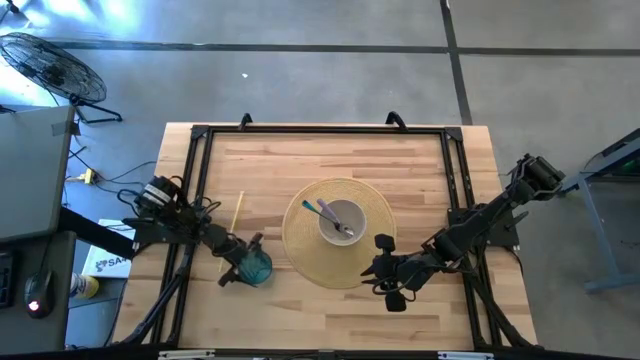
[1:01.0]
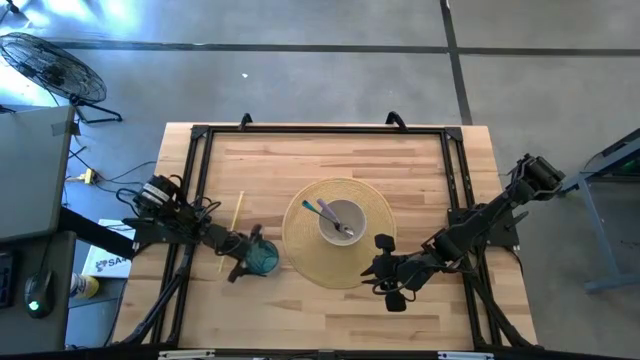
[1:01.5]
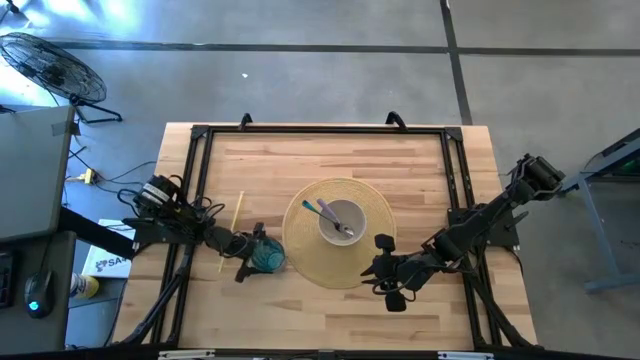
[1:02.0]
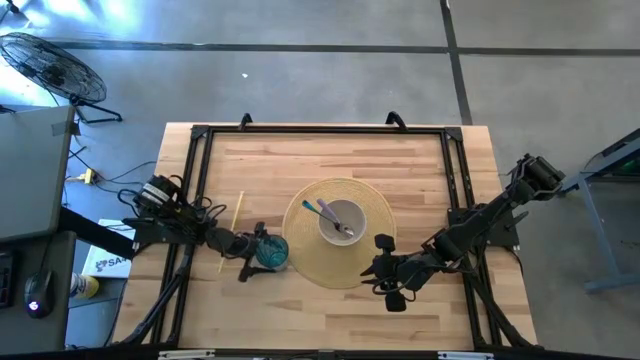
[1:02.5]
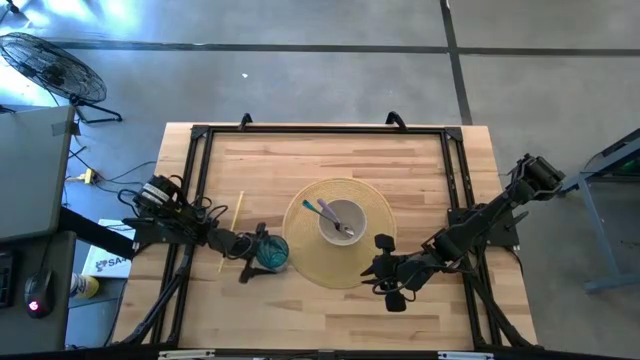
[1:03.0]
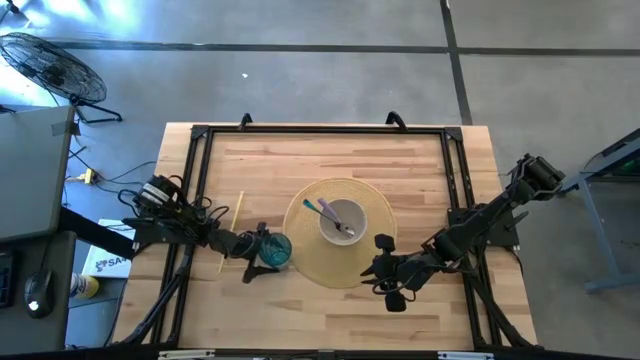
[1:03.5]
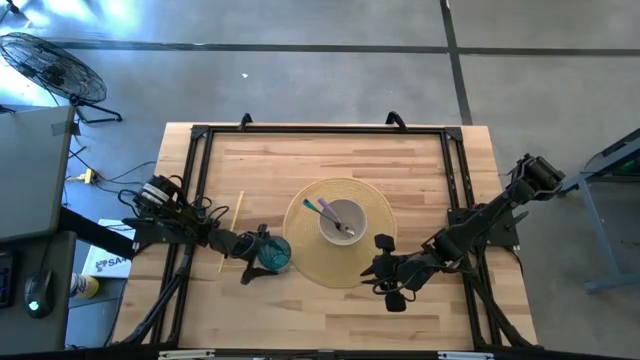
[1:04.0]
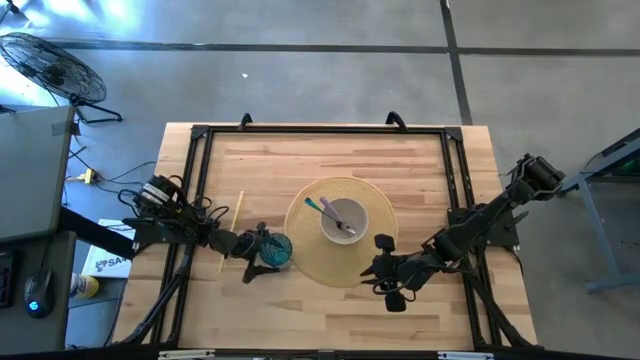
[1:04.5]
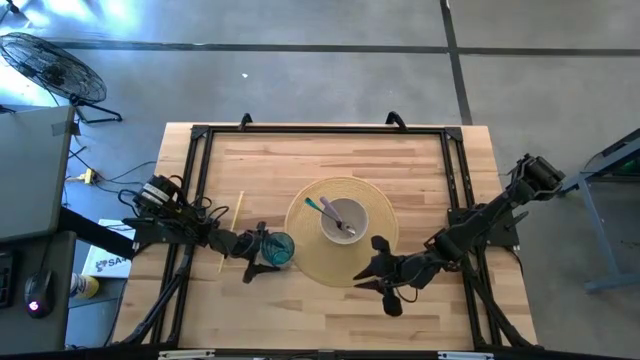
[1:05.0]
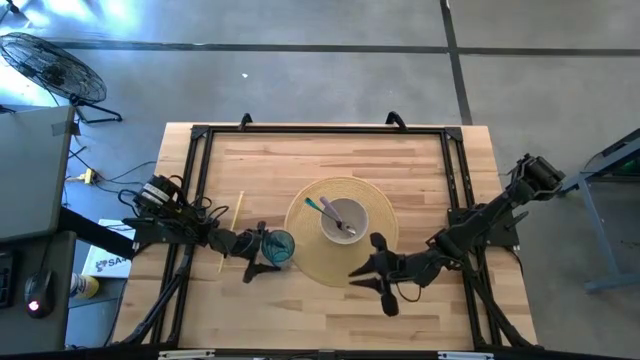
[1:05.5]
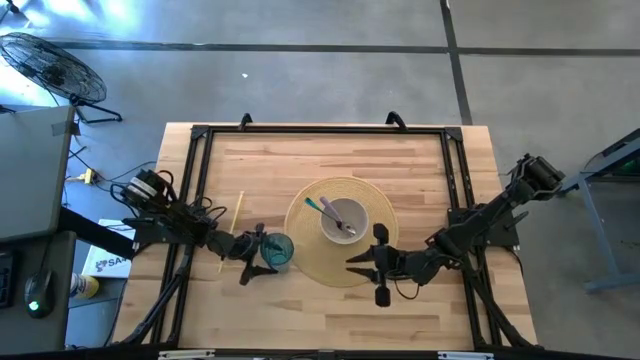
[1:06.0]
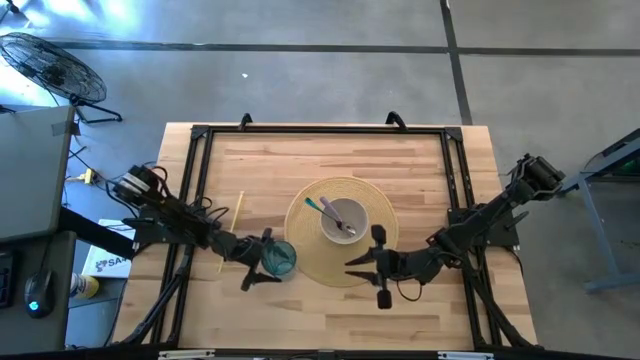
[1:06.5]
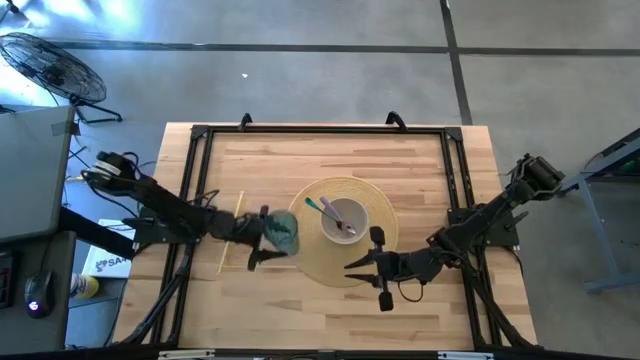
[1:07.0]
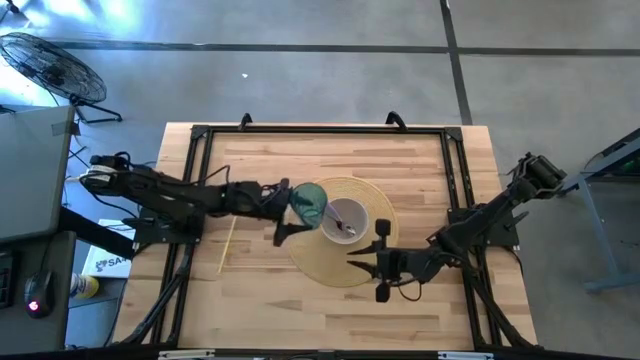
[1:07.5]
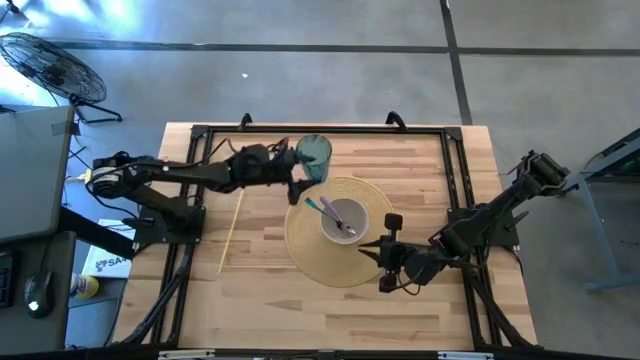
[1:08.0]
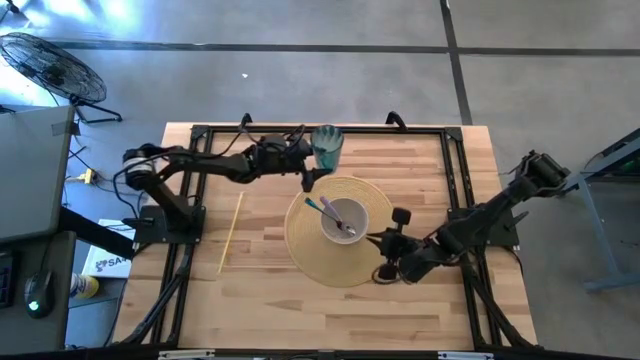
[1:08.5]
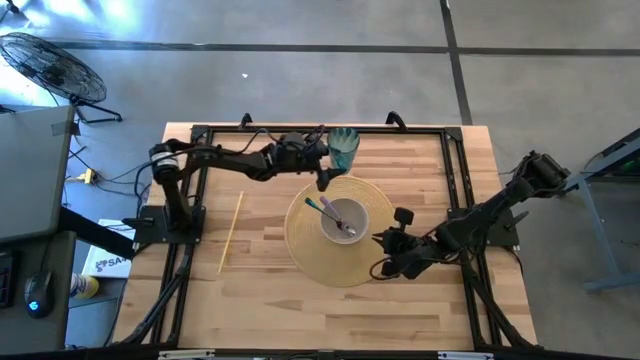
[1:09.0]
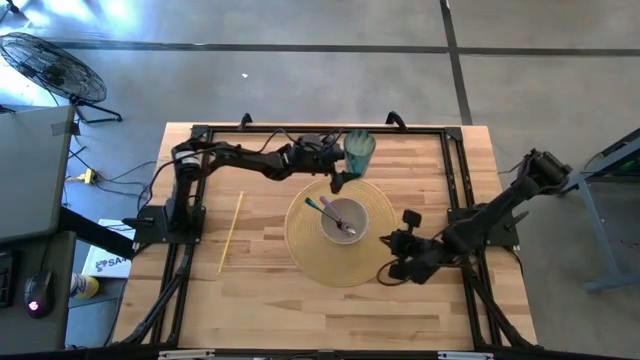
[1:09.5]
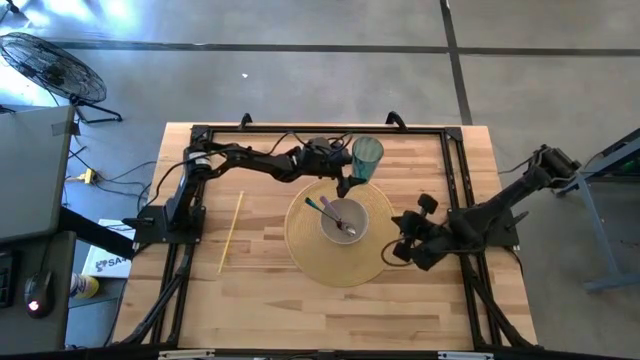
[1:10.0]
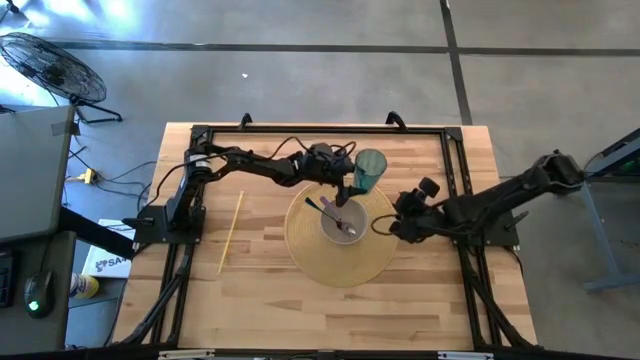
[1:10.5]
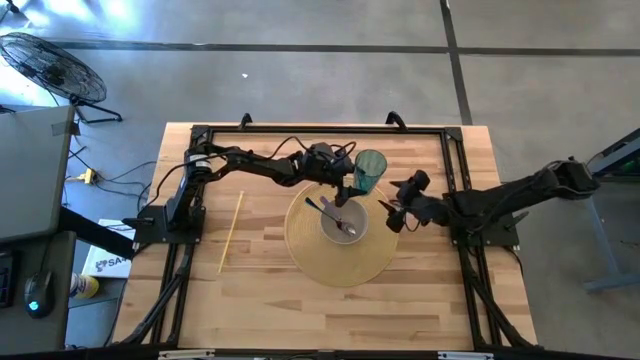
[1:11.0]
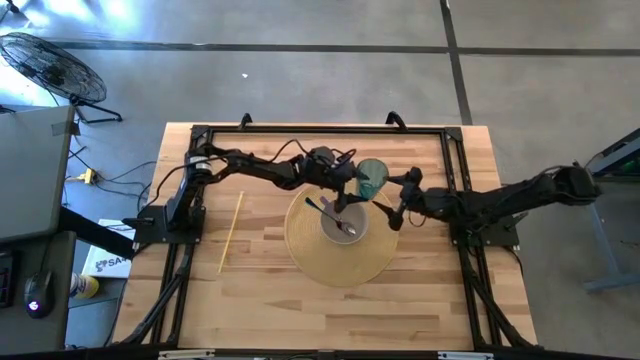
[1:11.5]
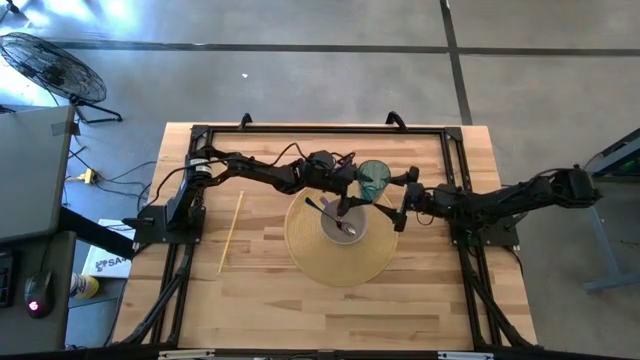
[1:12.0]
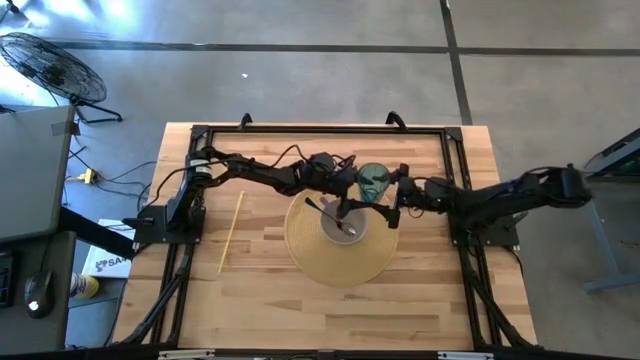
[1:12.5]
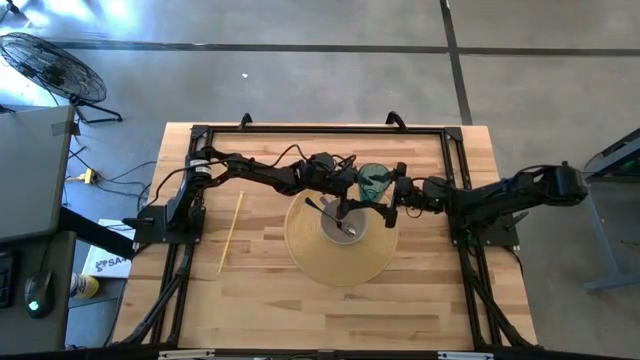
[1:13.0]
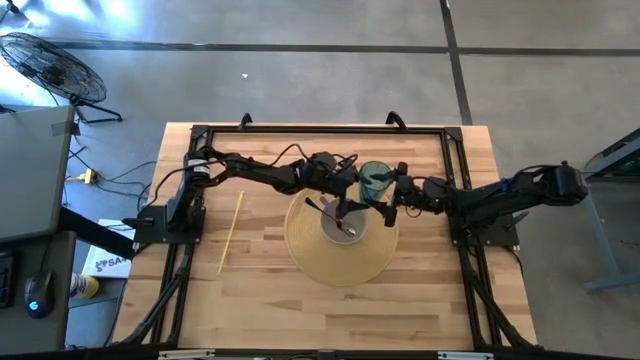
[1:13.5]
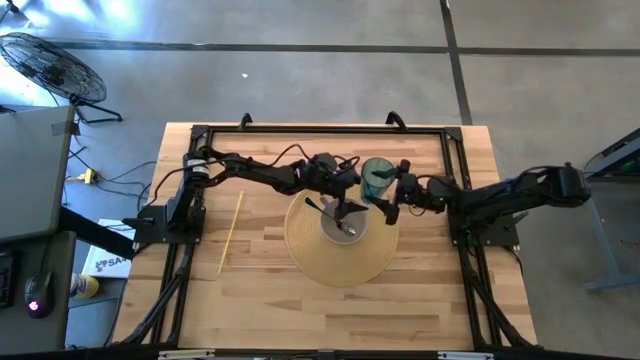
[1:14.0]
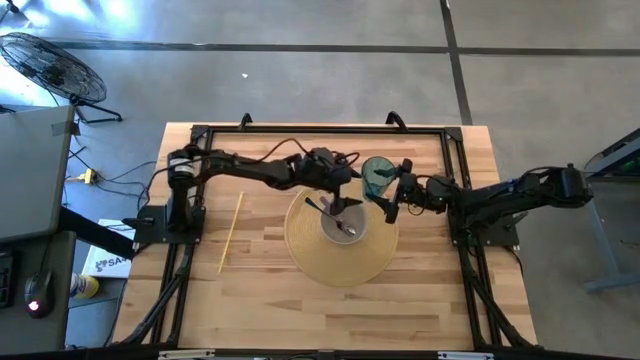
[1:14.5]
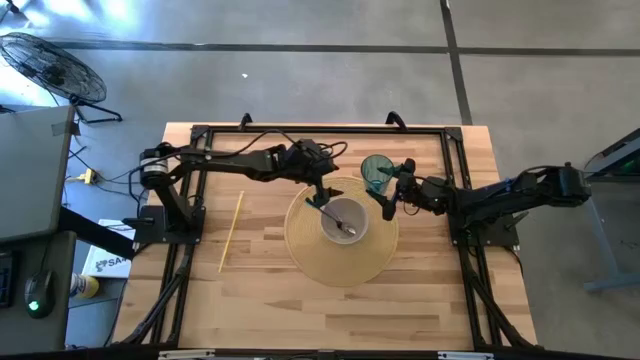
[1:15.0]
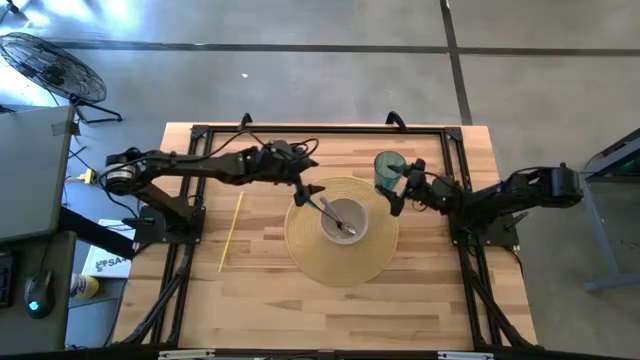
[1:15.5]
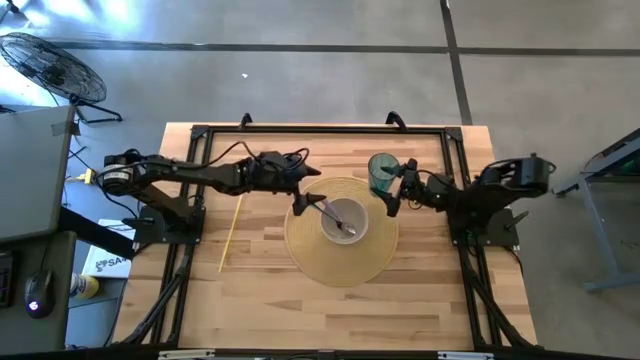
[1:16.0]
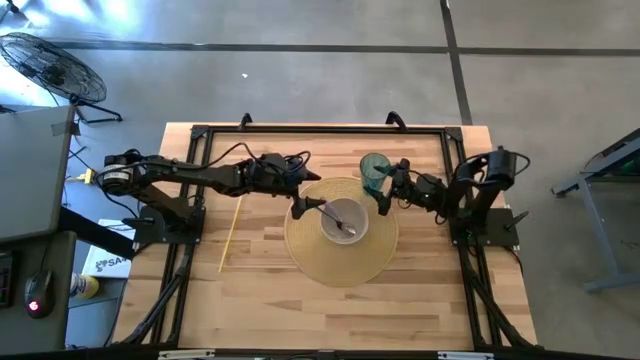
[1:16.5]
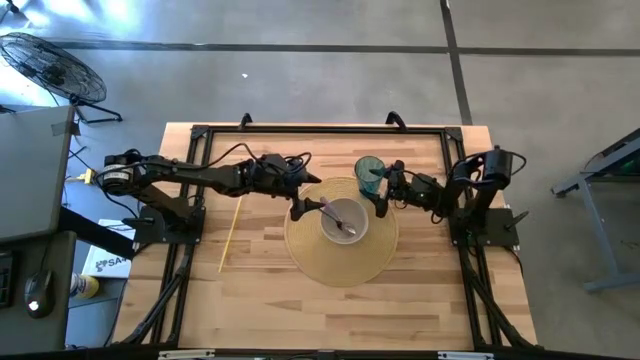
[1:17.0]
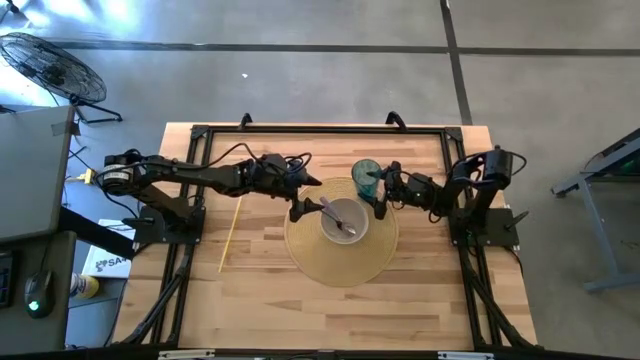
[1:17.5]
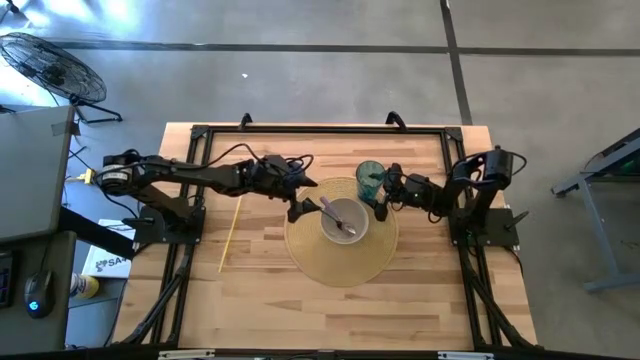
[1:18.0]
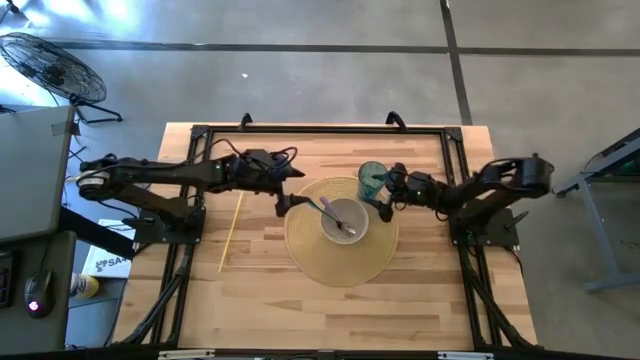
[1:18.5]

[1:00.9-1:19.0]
Task: Pick & Place Utensil
Put the green cup to the top right of the white bowl on the table placemat

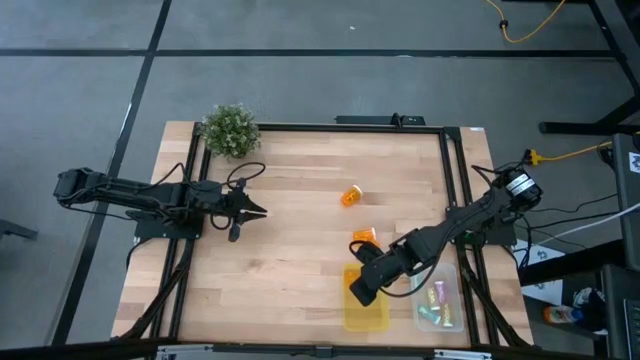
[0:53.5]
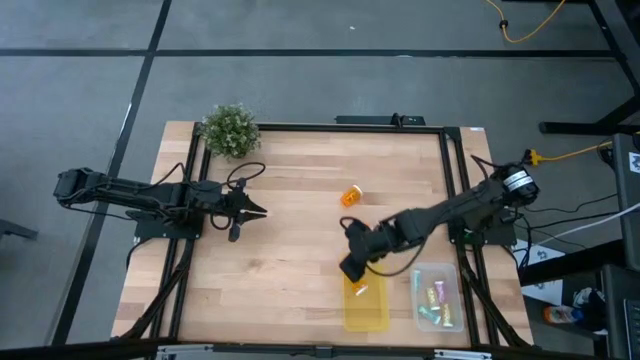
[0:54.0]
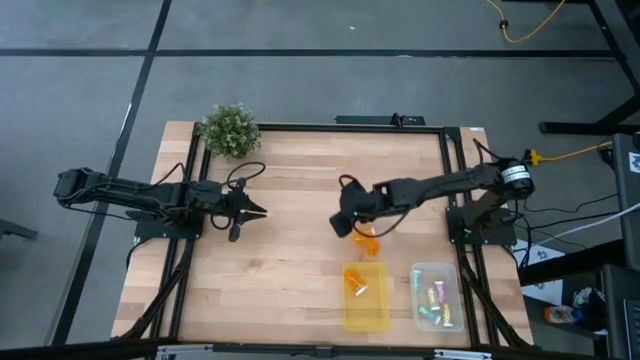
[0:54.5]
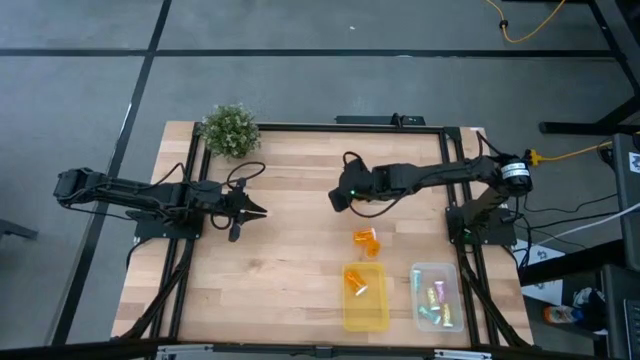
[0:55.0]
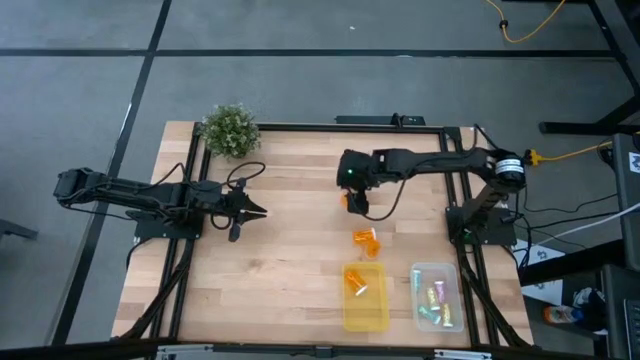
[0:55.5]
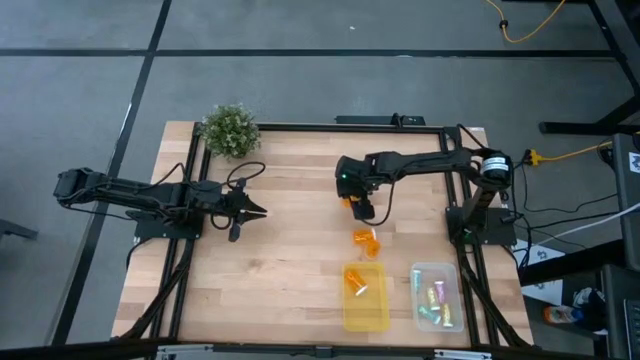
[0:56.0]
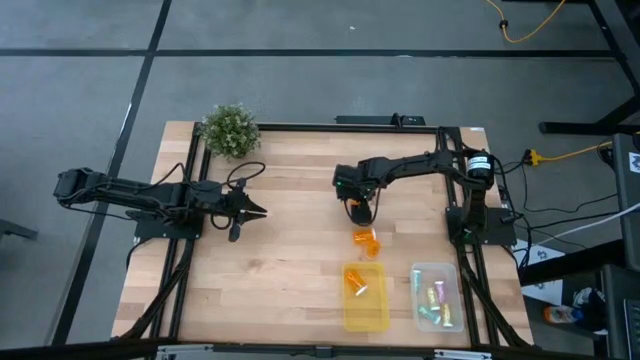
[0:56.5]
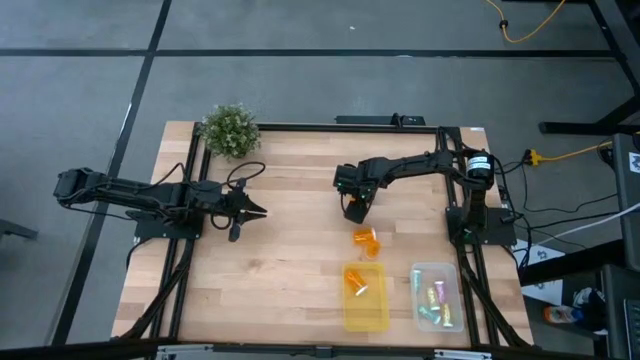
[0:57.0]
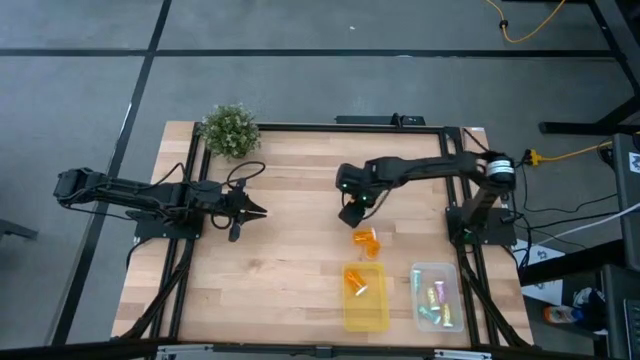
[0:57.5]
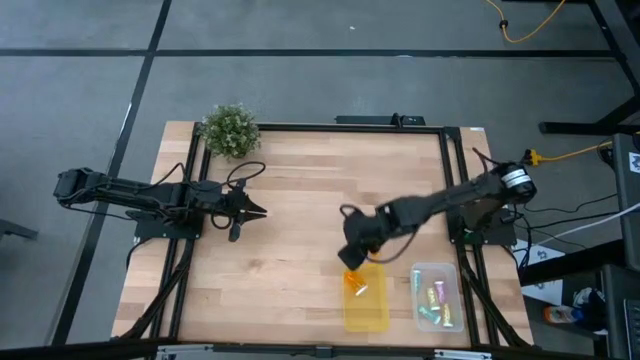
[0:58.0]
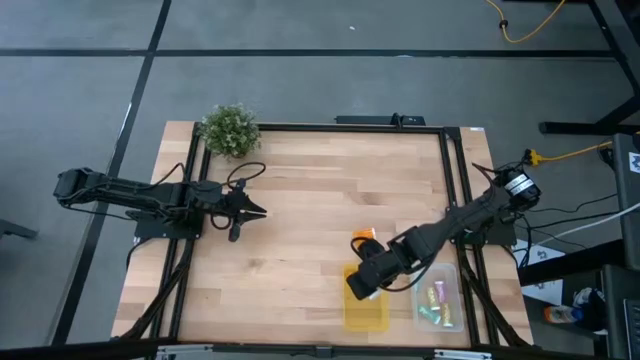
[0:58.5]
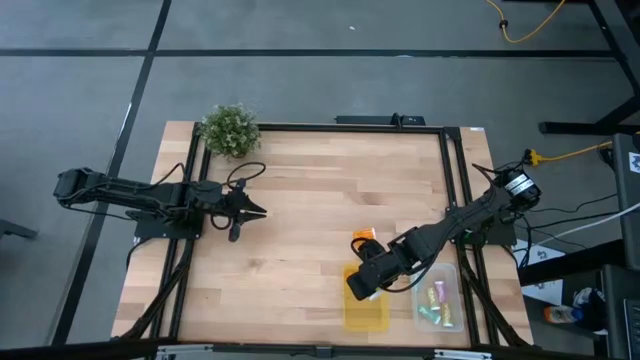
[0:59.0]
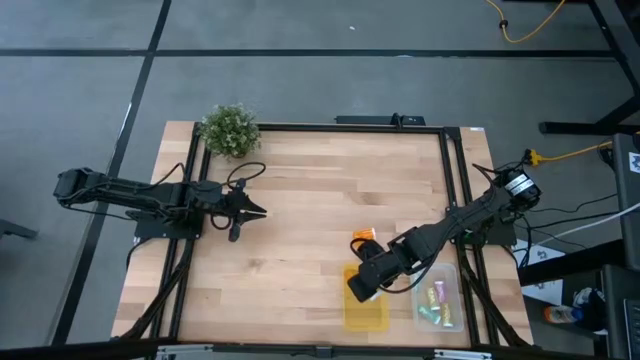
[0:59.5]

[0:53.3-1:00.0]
Task: Pick and place medicine bottles into bin by pill shape (circle, oval)
Put the orange capsule bottle into the yellow bin
